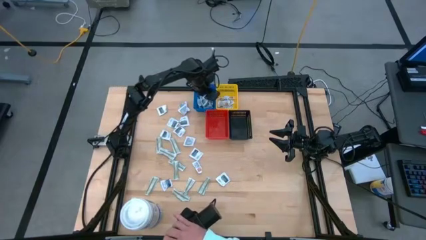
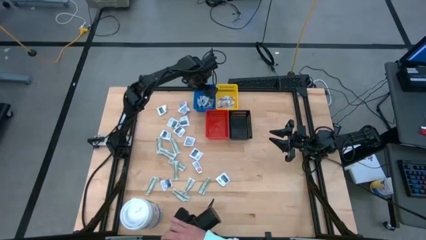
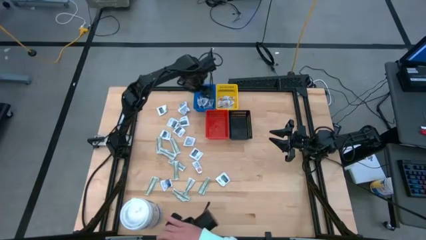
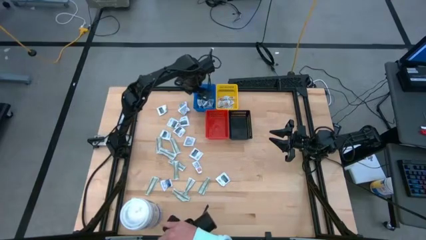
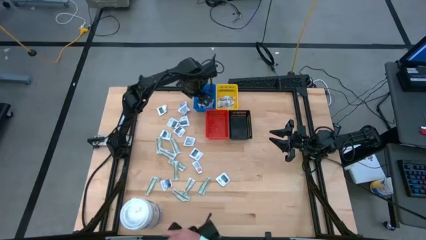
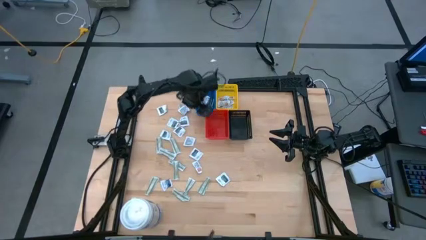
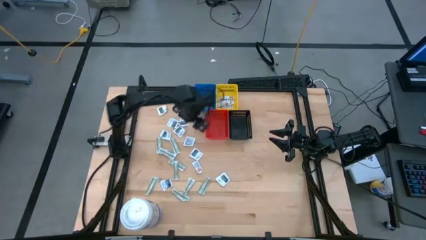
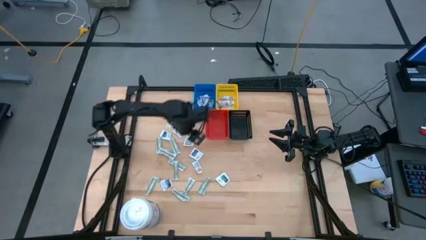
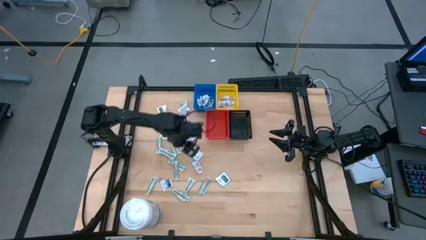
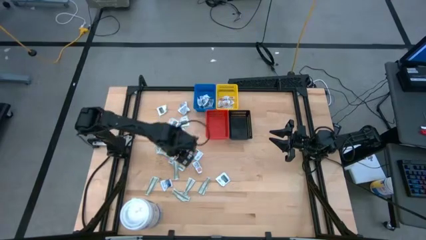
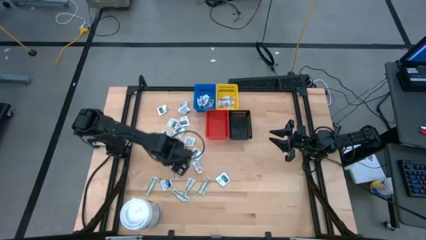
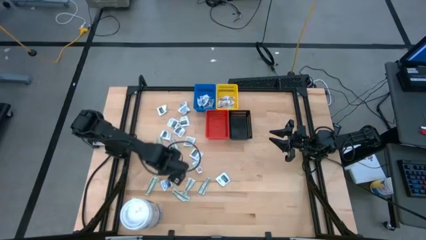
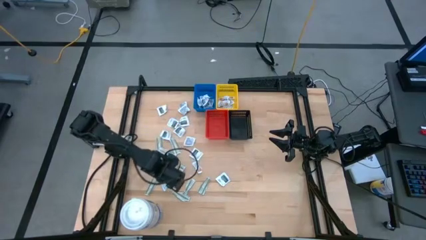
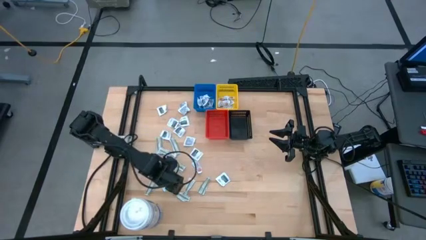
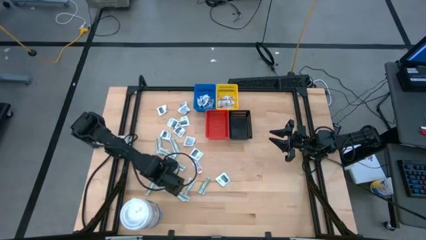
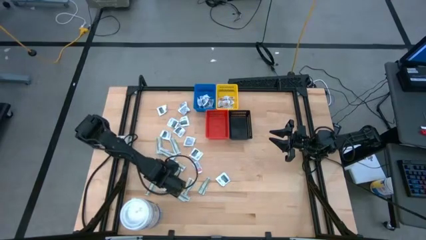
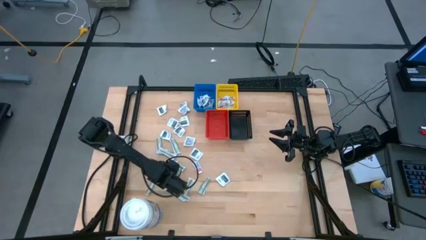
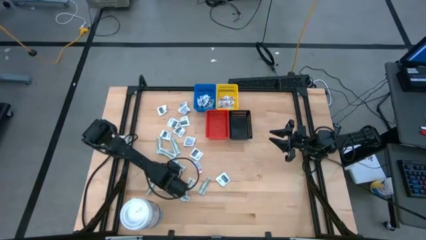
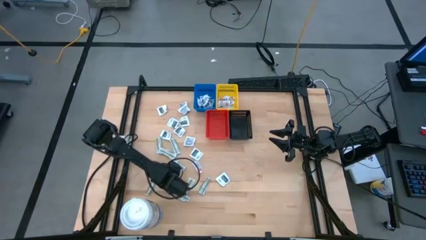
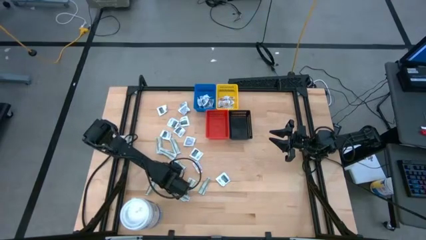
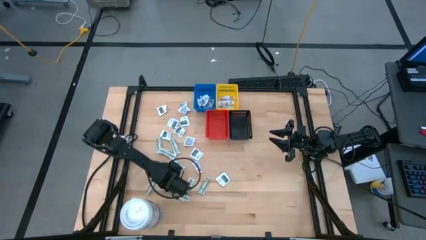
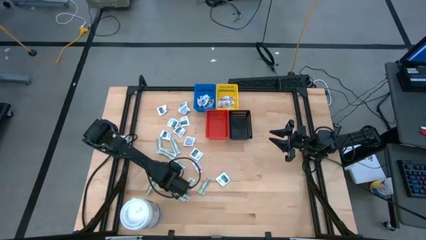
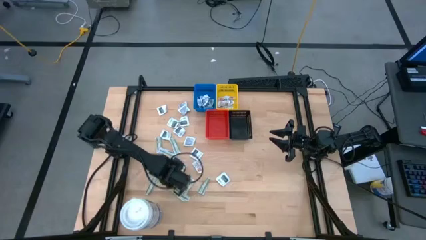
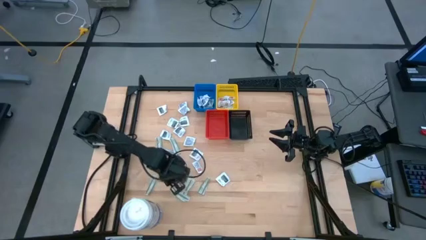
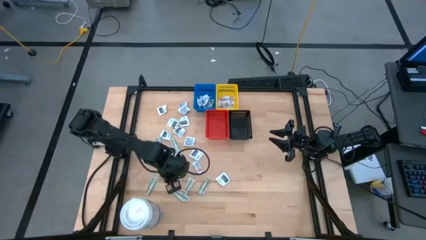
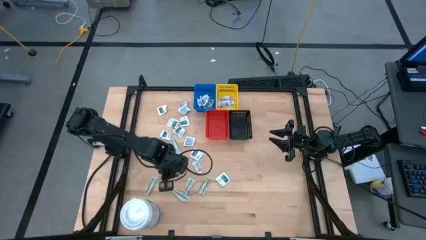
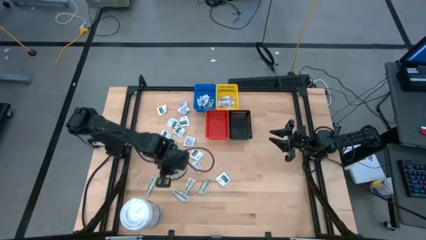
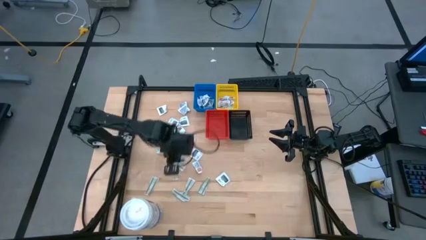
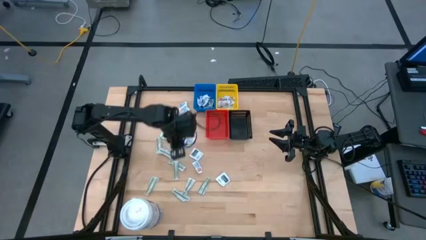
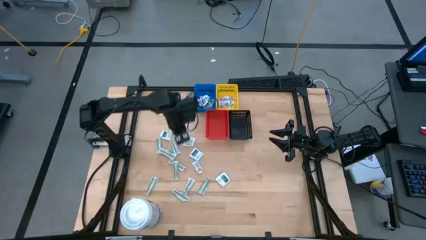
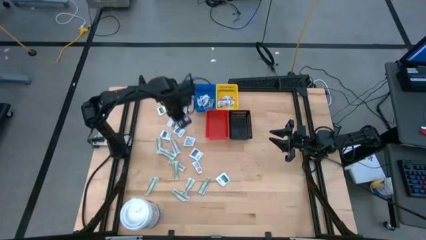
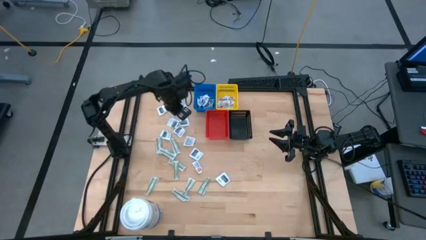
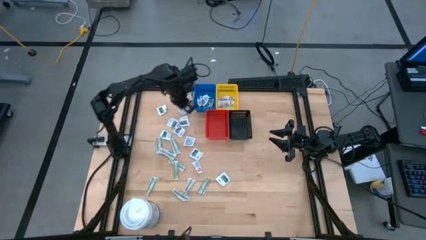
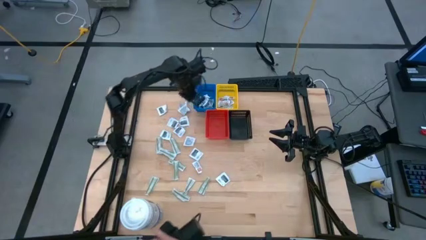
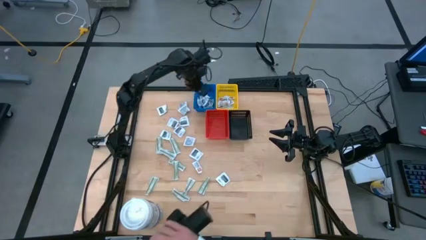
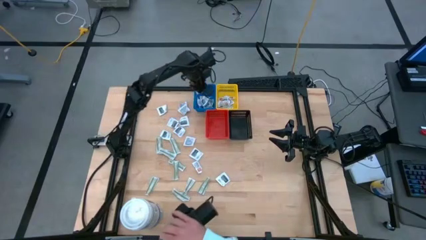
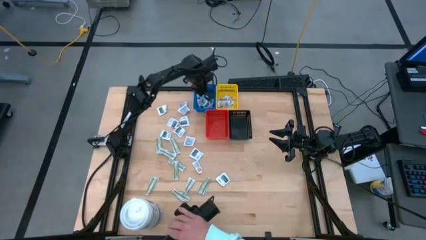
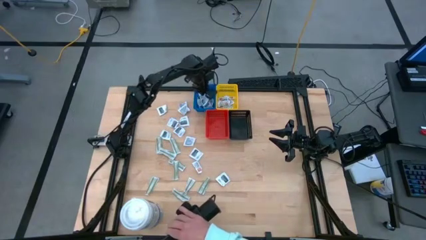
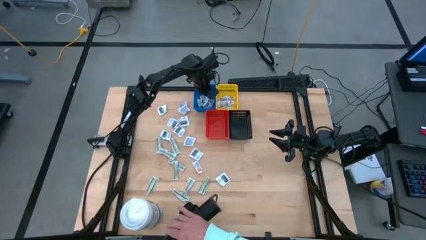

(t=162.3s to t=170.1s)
Task: Pick & Place First Aid Supplies
Put the alcohol pad into the blue bin

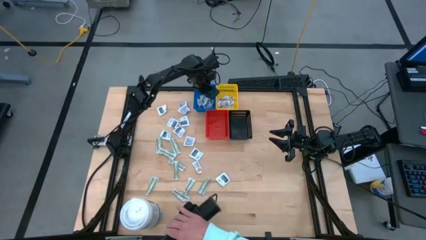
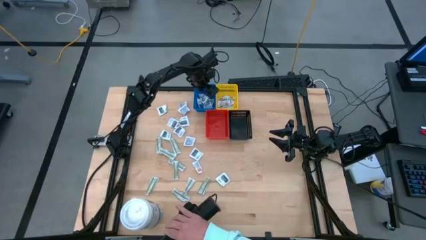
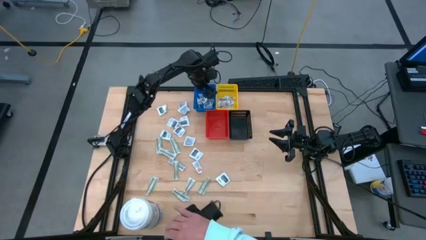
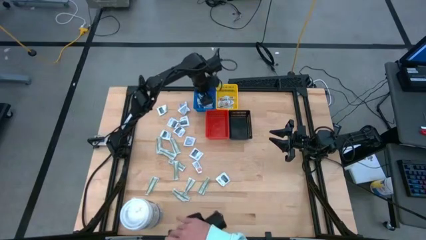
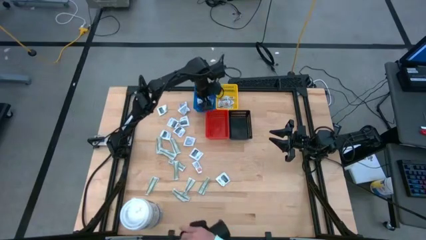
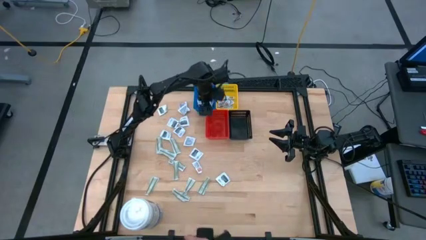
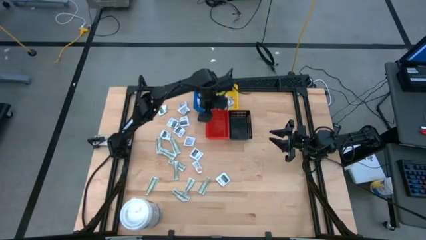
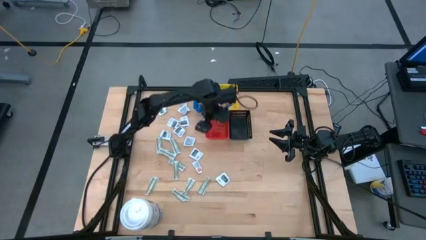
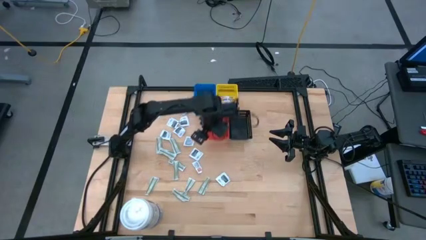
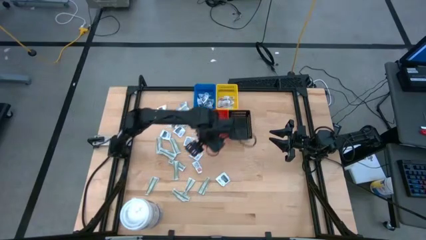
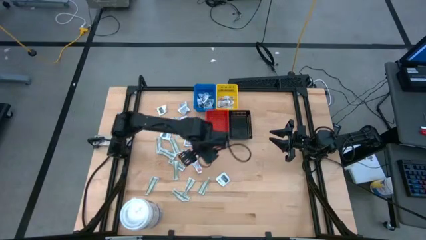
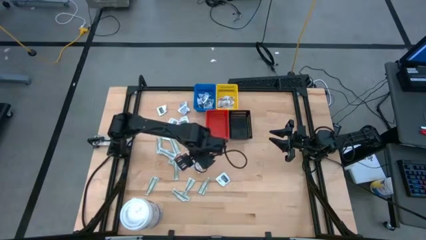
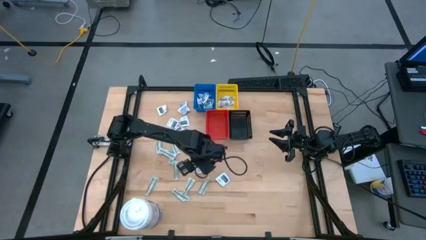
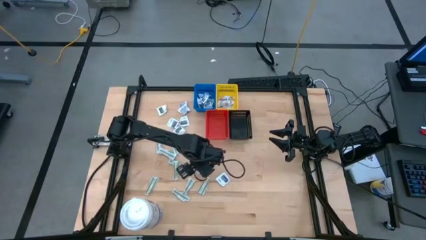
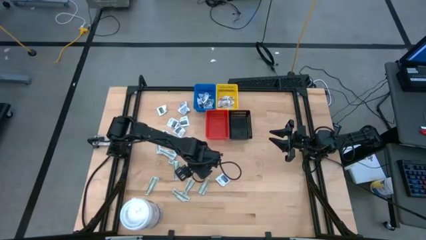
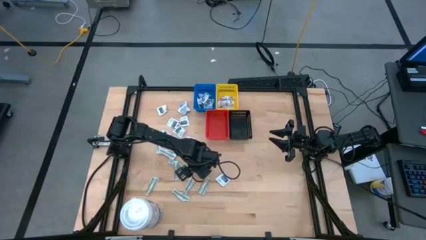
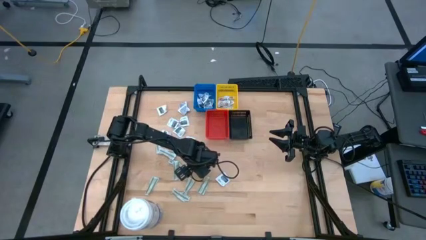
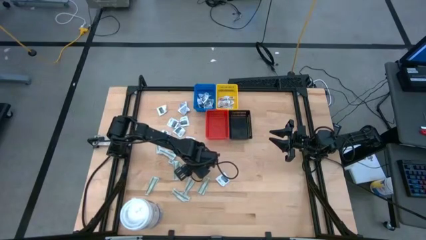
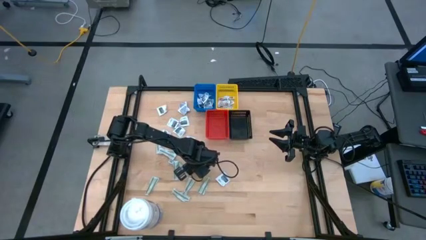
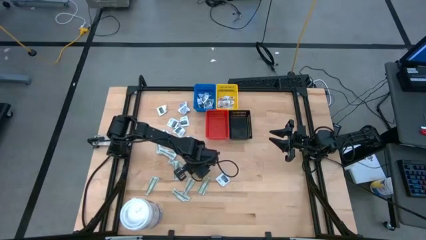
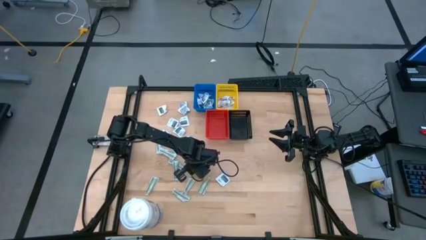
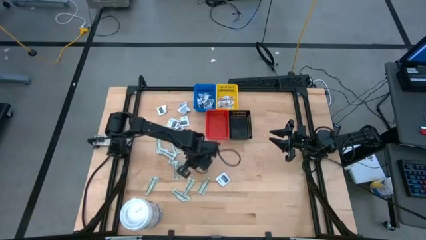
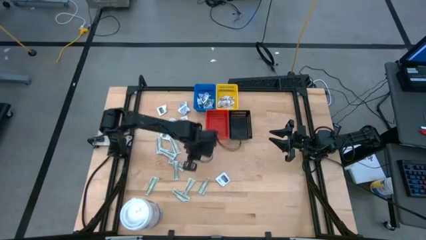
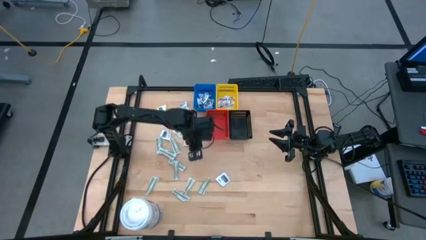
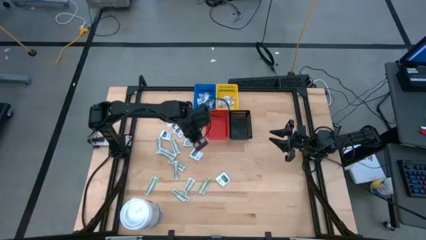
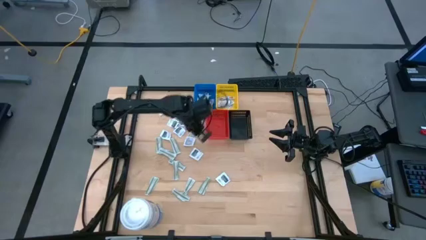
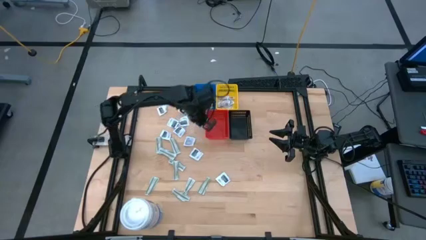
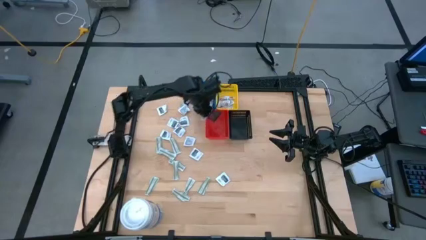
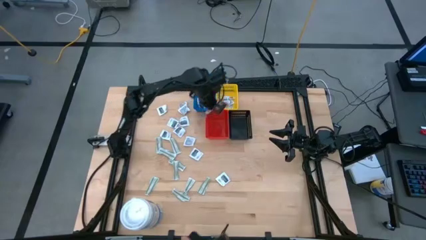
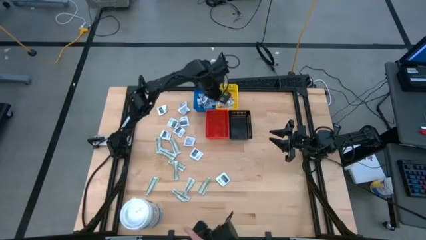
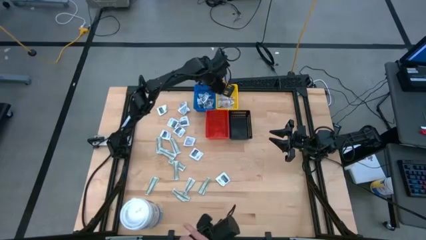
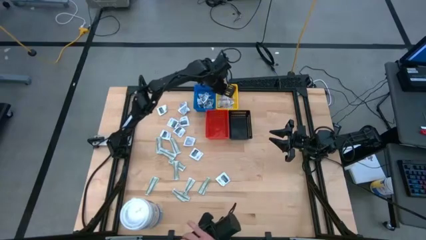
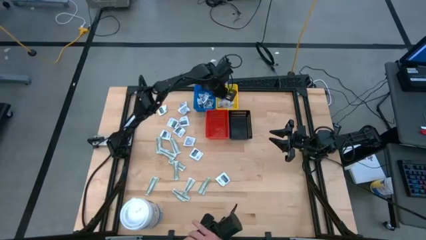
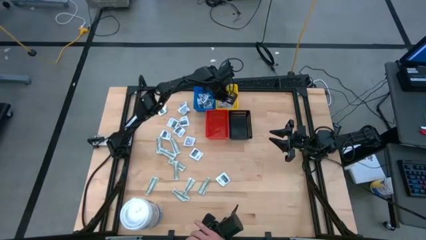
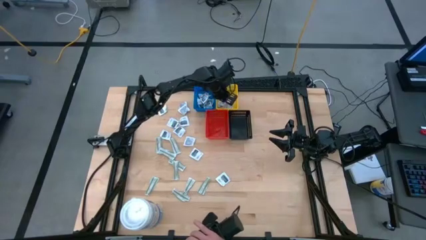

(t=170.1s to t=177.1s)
Put the ointment pack into the yellow bin
